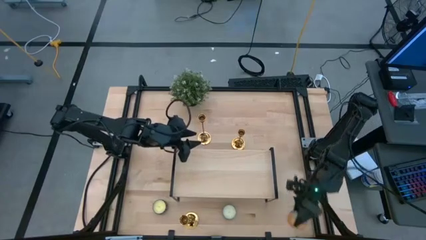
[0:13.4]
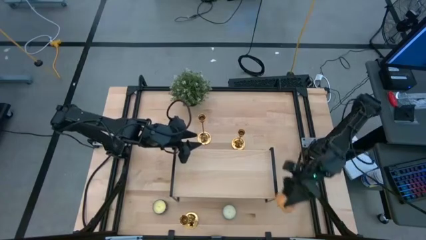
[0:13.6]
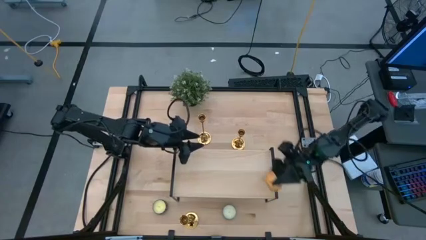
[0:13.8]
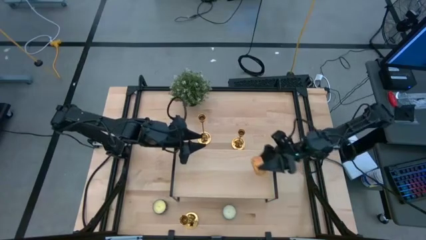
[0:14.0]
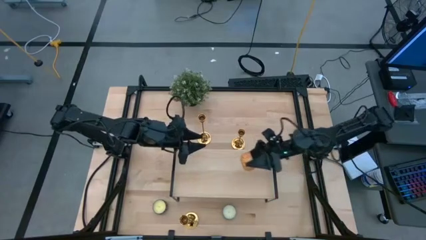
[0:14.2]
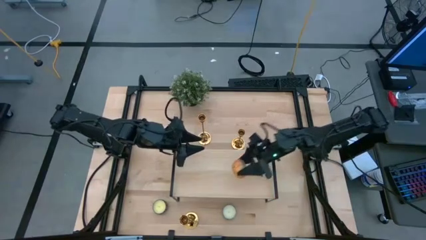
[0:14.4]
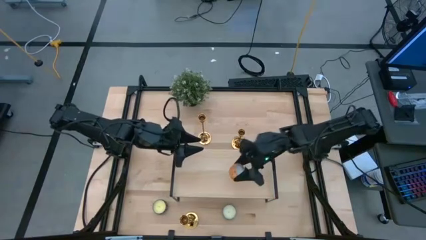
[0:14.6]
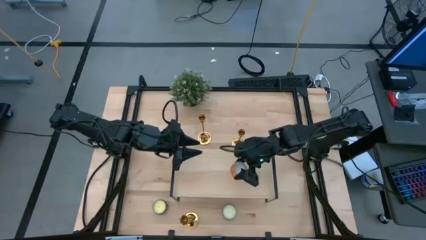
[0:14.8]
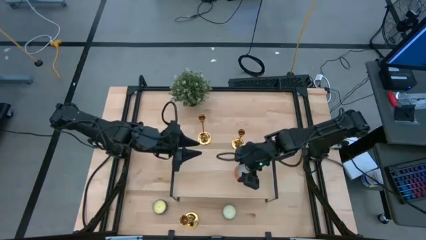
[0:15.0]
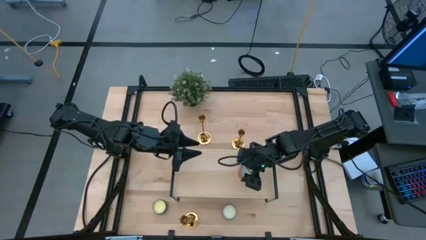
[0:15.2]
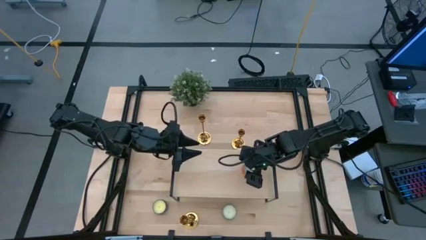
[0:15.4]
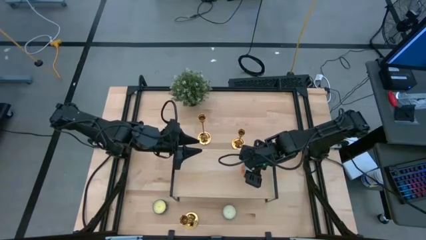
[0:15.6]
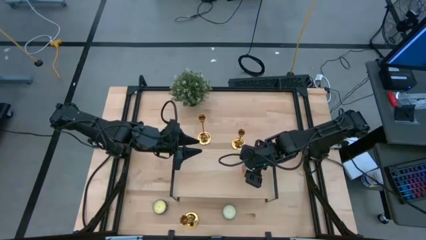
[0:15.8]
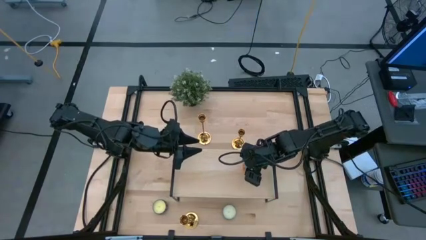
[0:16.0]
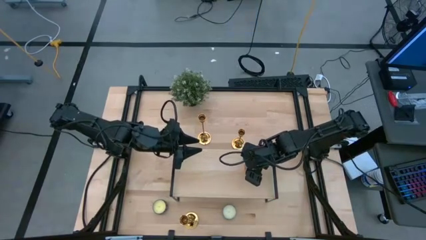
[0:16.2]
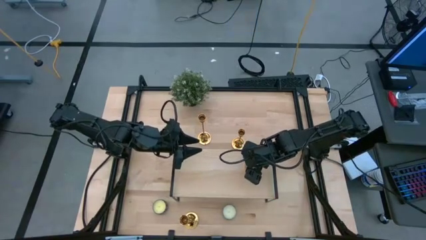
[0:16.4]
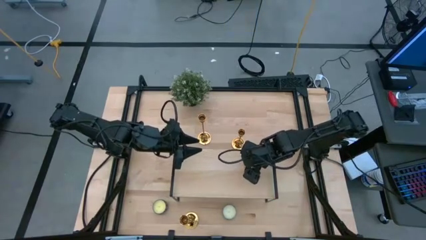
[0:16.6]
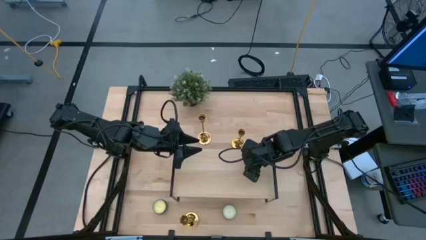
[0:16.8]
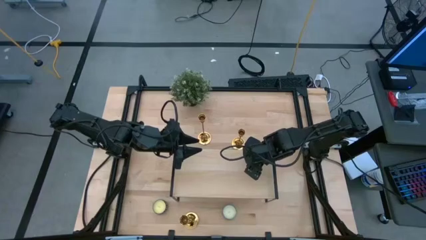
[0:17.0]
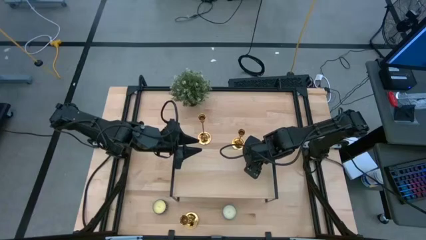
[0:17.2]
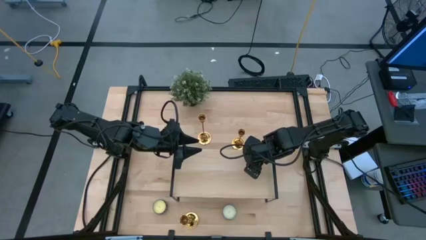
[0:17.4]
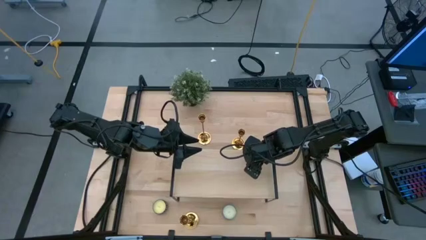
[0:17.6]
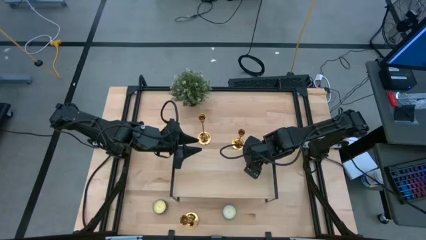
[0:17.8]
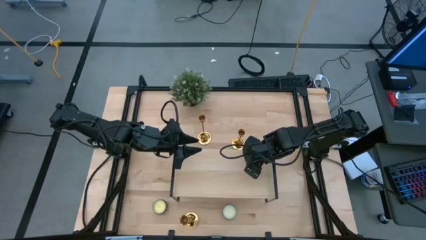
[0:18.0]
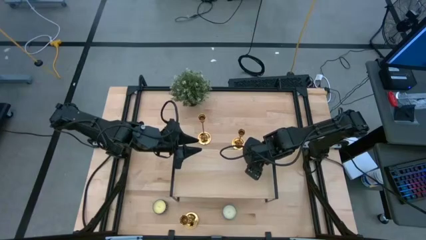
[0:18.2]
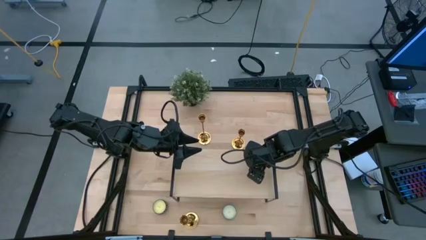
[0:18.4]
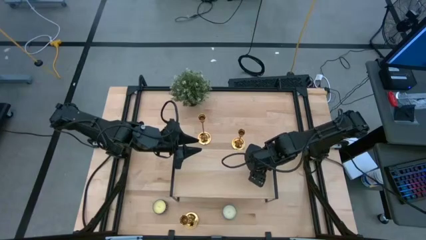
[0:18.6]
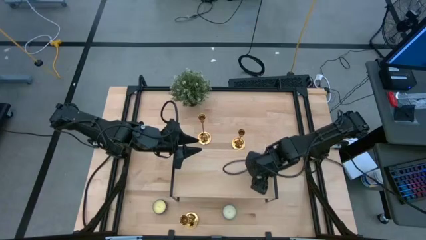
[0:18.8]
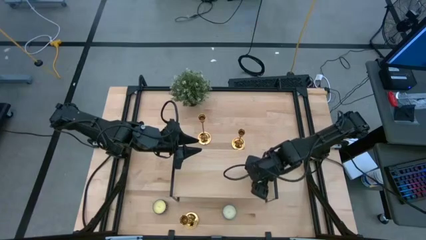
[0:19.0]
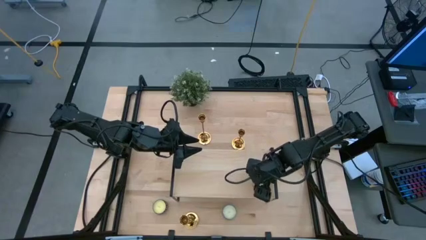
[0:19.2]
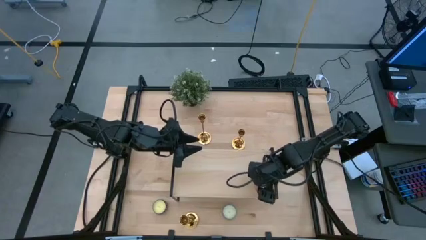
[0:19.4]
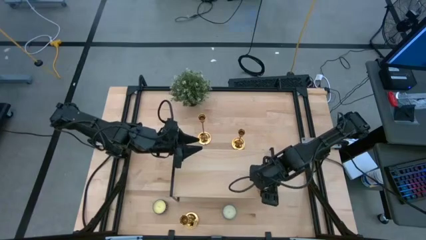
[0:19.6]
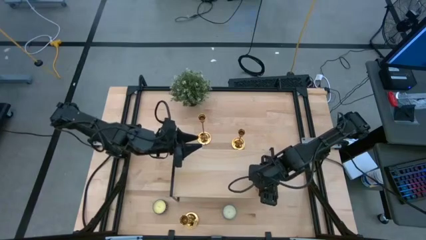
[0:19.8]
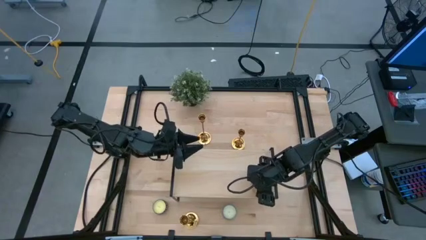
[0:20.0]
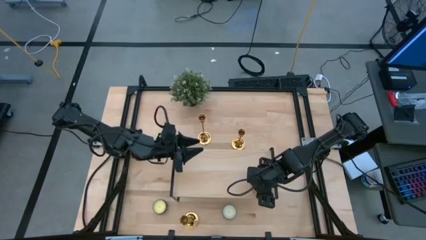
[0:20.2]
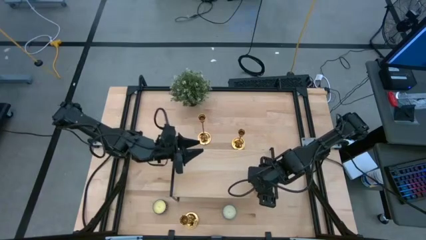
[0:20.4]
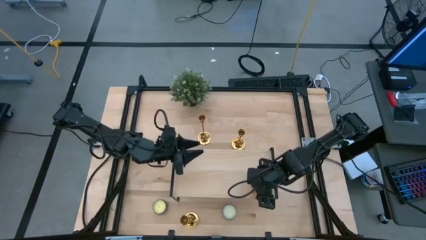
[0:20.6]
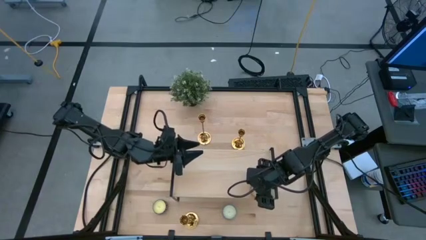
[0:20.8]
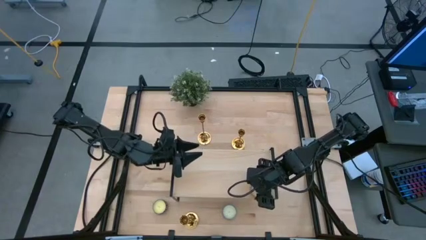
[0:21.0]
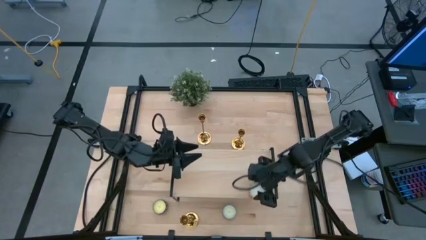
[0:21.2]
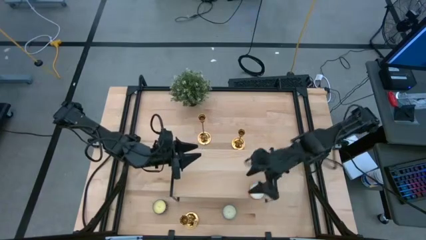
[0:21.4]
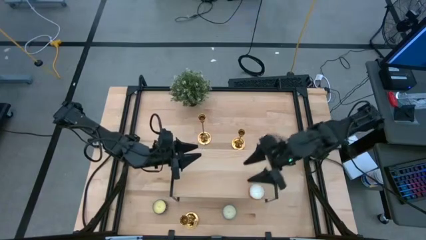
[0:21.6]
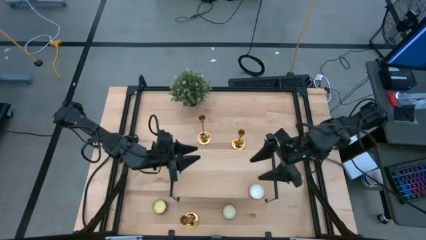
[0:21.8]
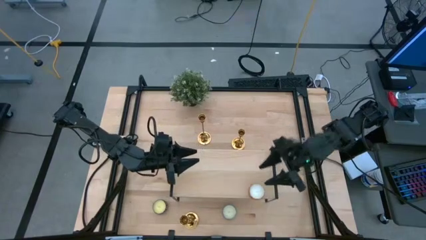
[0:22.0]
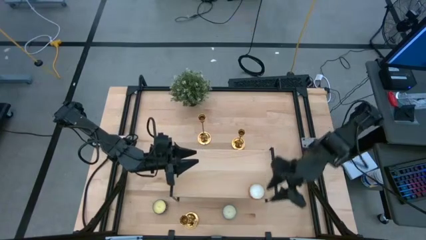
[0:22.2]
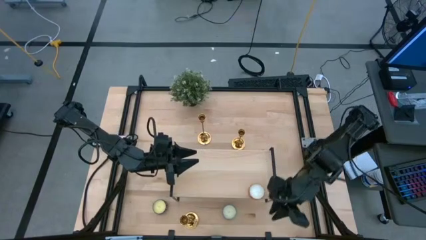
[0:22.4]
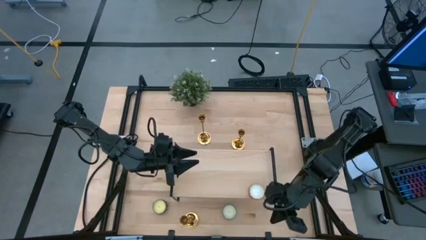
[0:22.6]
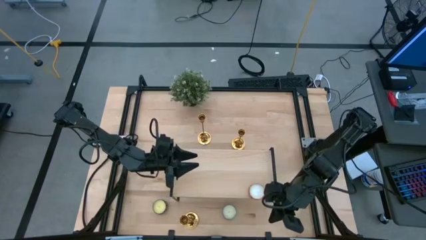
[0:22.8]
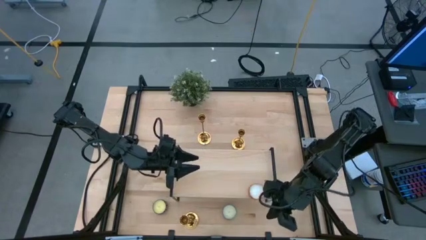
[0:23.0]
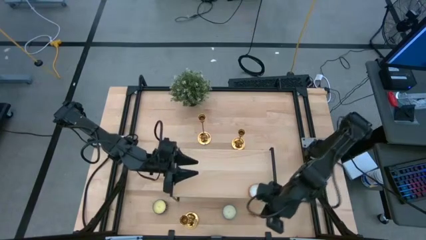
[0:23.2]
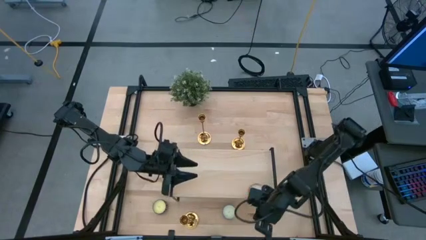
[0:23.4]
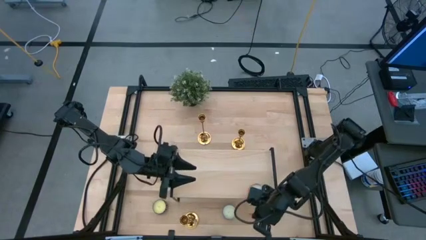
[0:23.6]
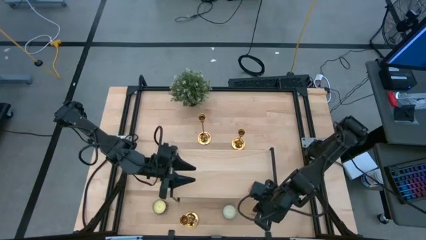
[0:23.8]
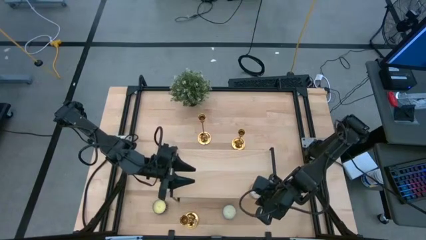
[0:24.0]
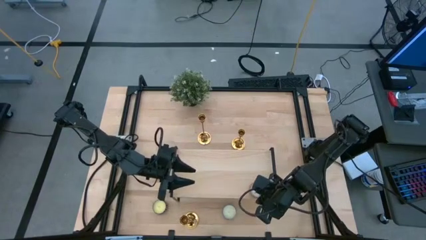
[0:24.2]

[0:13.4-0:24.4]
Task: Pick & Place candle stick holders
Put the orange scented candle on the shelf

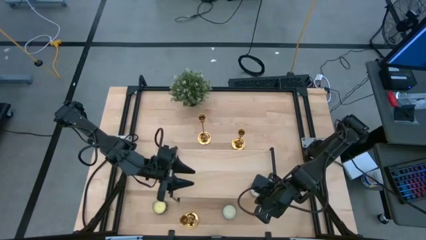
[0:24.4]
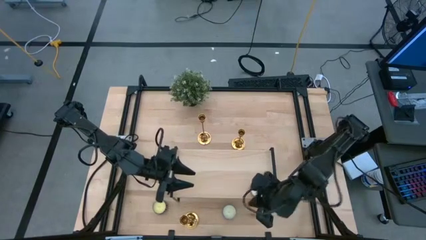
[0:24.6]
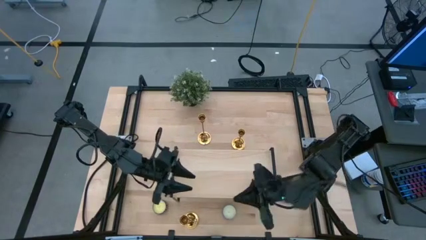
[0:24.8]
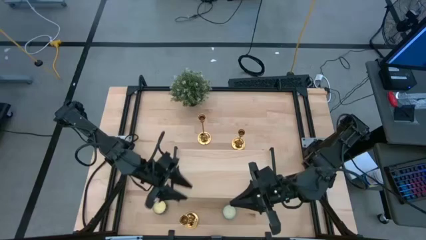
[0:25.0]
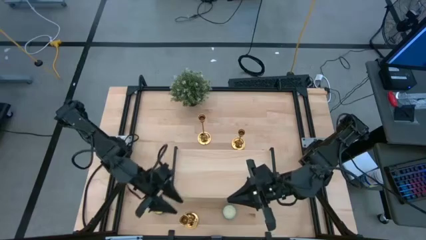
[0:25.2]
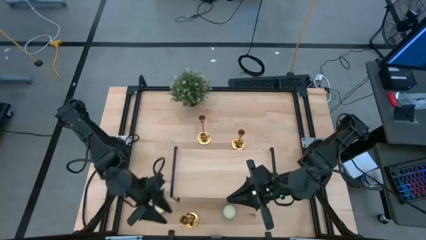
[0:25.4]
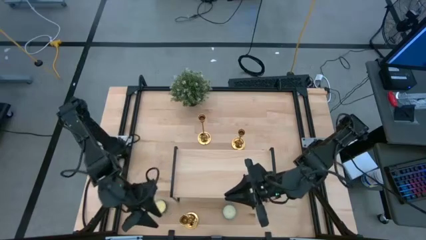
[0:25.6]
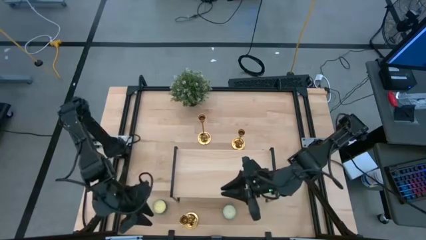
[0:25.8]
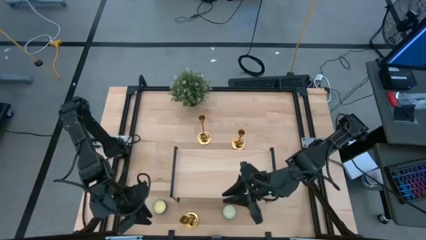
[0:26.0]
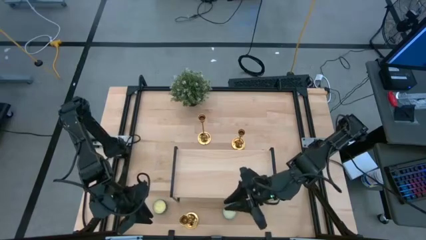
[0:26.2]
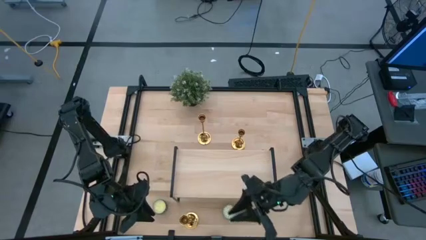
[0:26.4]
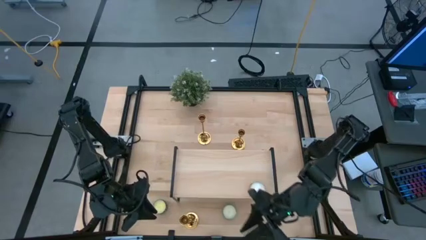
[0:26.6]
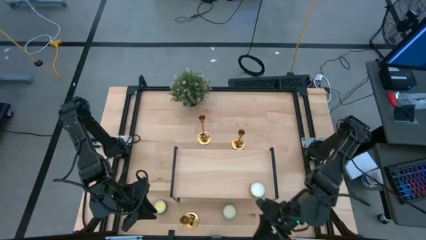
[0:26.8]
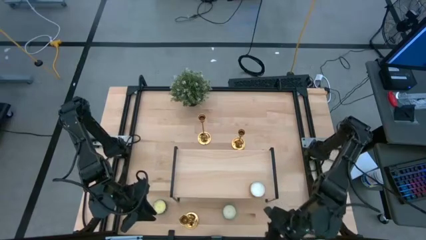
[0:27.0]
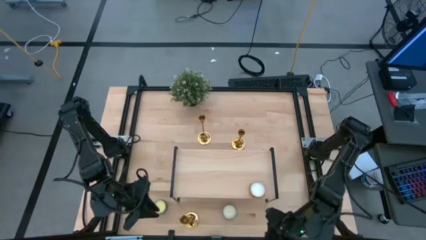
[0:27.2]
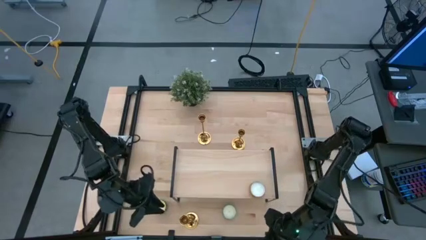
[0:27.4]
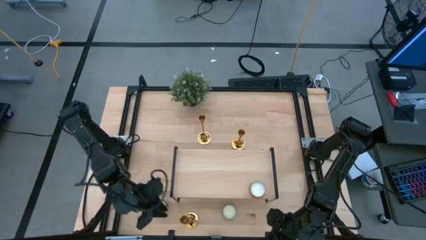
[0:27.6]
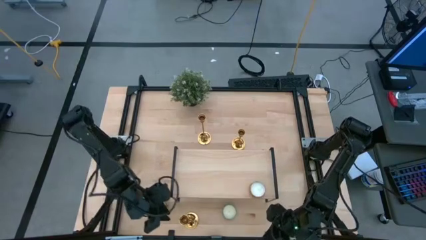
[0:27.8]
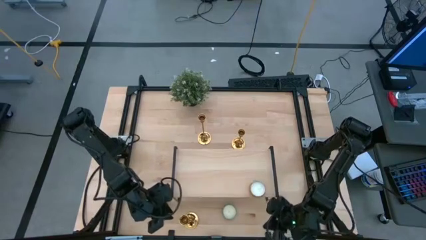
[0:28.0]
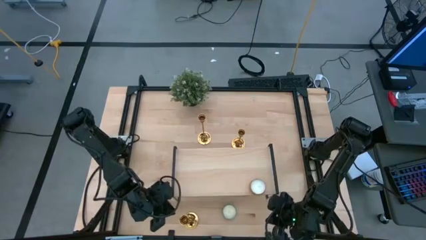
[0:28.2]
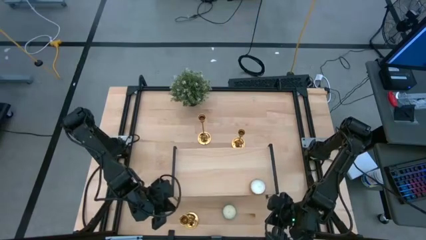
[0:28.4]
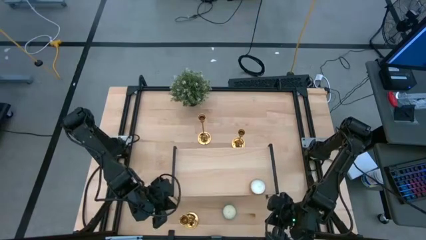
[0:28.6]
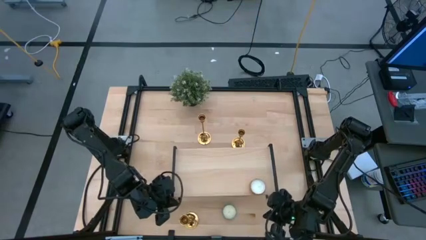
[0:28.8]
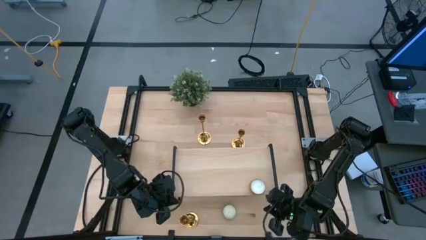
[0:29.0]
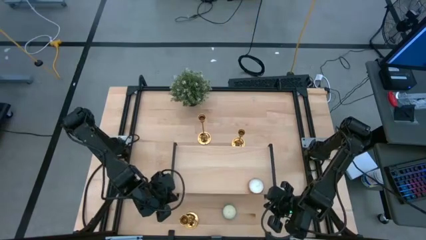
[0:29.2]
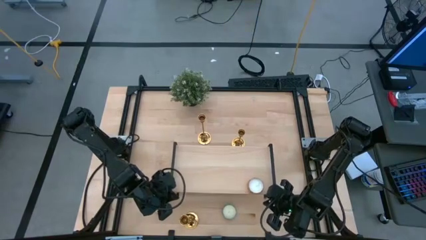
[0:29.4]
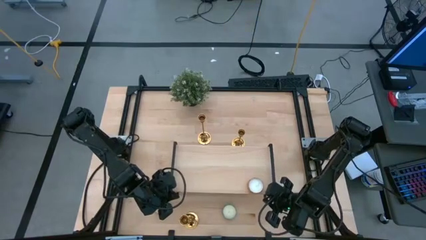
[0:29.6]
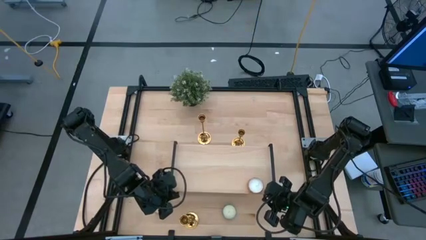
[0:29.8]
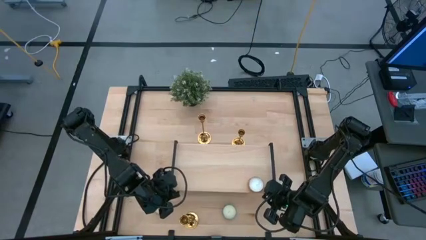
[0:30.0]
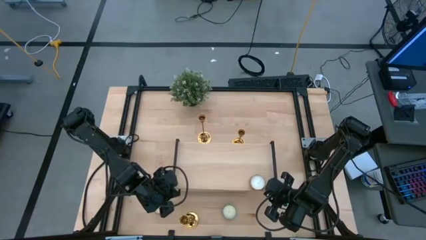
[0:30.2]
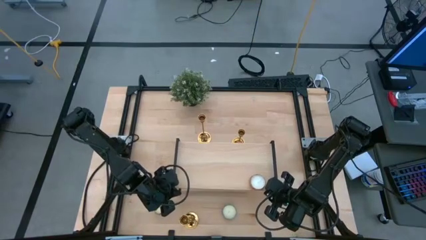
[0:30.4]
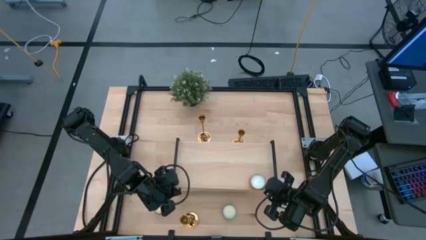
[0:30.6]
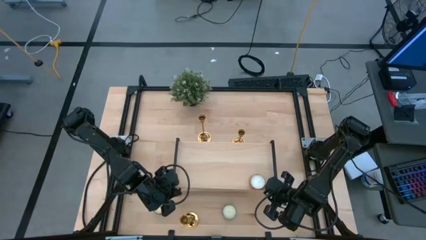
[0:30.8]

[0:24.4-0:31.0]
Adjust the shelf
